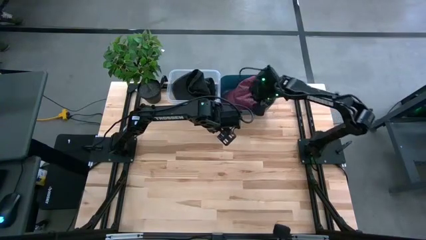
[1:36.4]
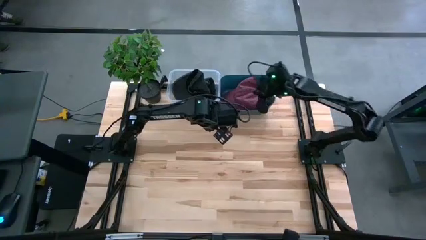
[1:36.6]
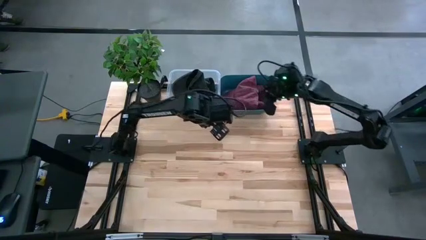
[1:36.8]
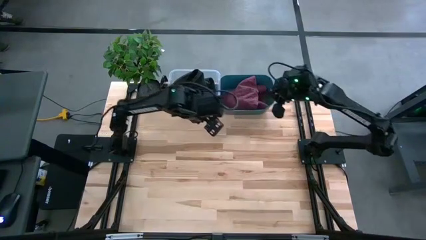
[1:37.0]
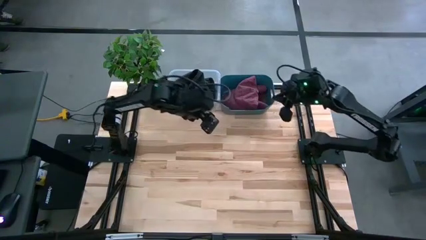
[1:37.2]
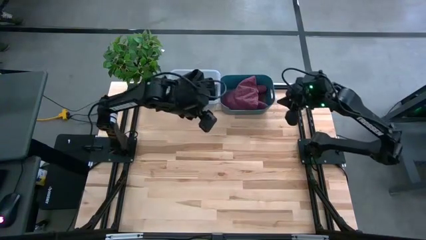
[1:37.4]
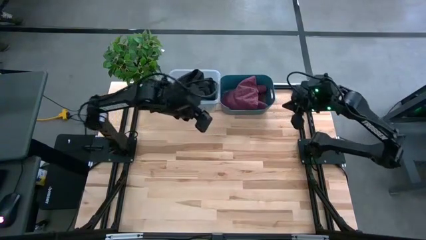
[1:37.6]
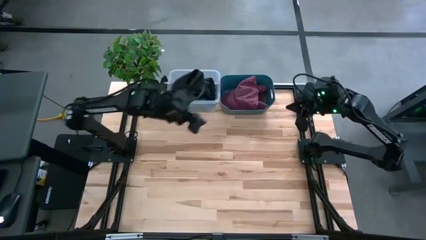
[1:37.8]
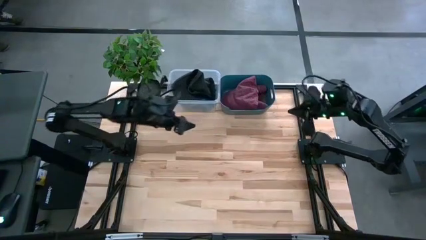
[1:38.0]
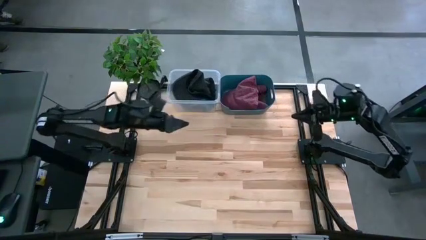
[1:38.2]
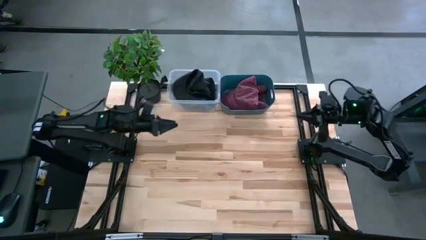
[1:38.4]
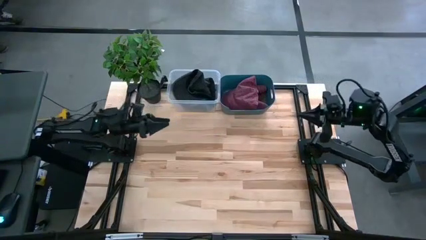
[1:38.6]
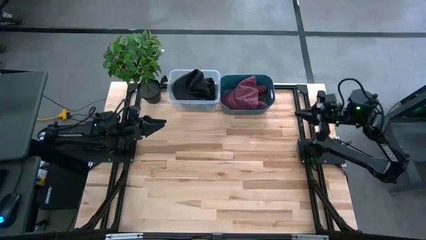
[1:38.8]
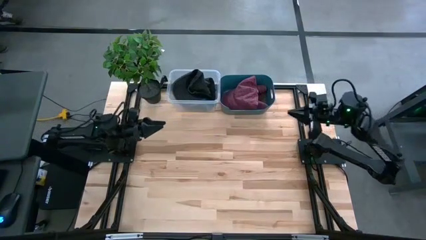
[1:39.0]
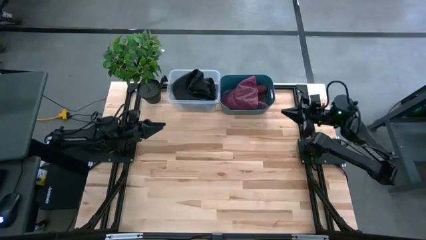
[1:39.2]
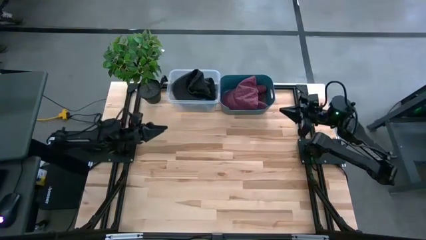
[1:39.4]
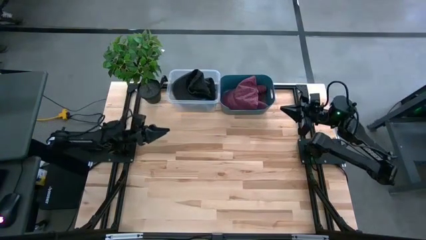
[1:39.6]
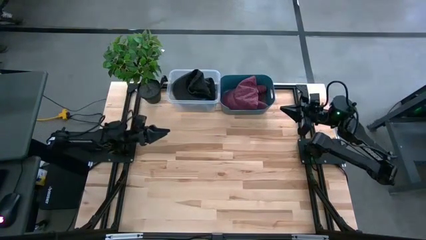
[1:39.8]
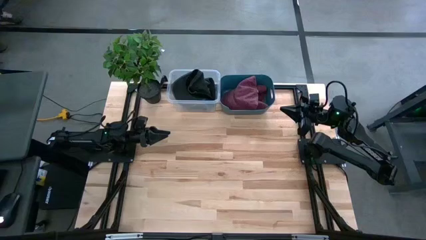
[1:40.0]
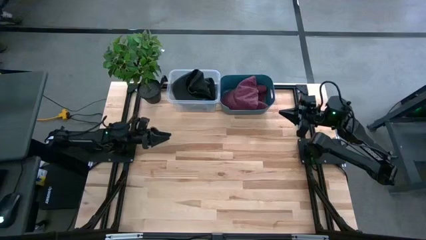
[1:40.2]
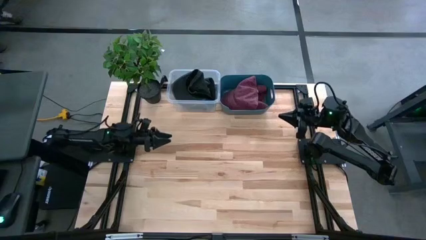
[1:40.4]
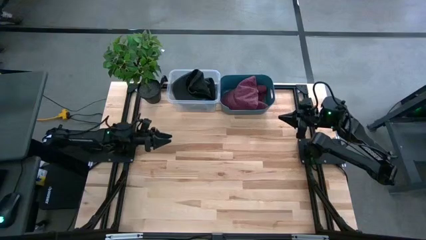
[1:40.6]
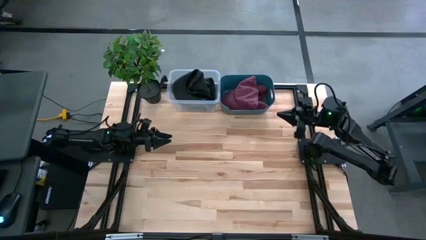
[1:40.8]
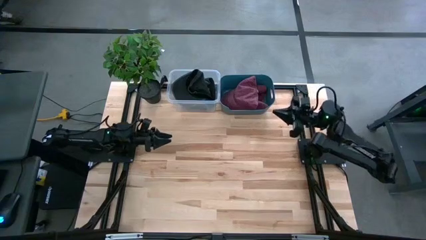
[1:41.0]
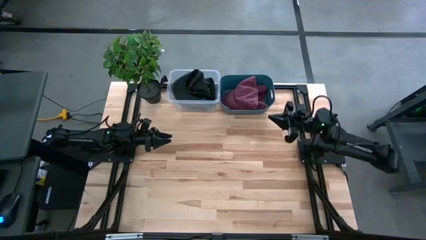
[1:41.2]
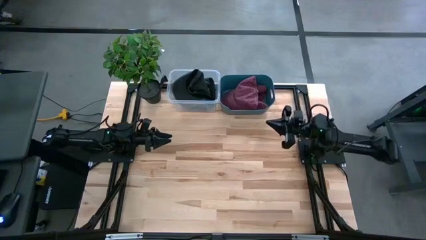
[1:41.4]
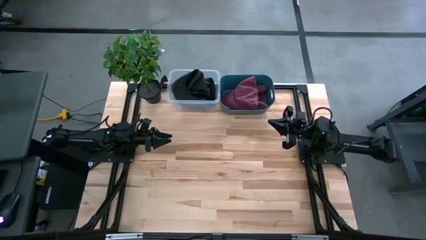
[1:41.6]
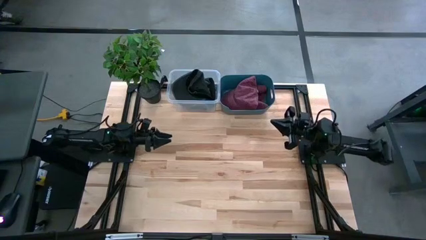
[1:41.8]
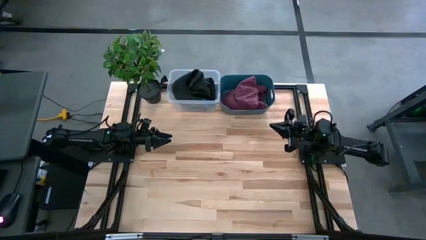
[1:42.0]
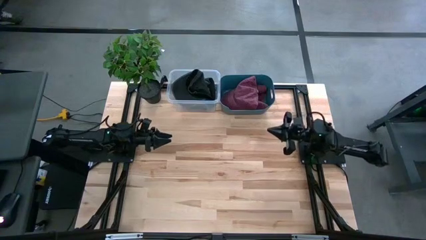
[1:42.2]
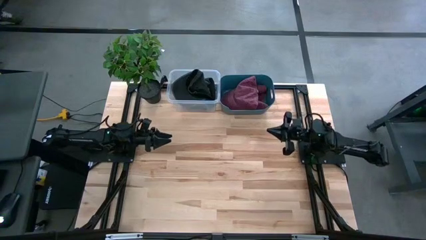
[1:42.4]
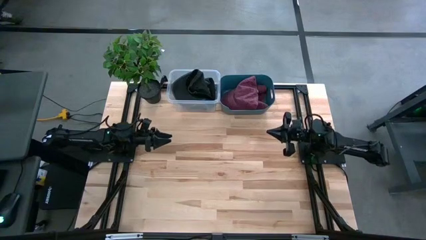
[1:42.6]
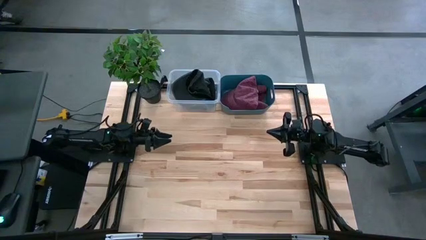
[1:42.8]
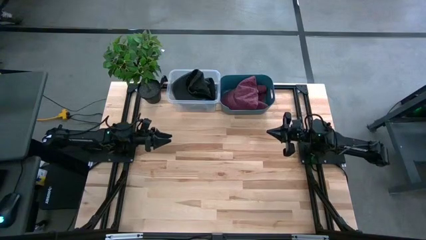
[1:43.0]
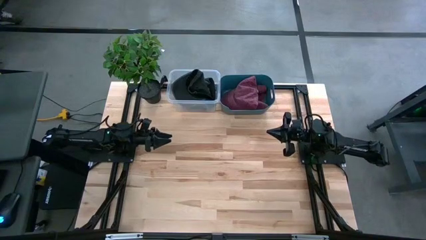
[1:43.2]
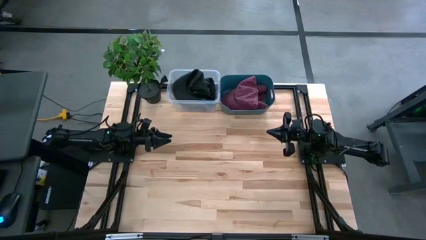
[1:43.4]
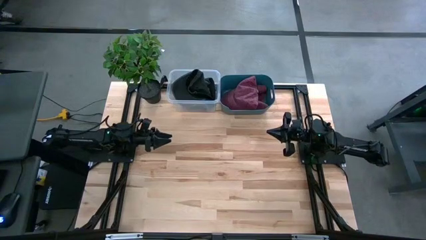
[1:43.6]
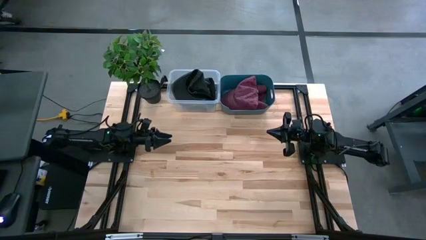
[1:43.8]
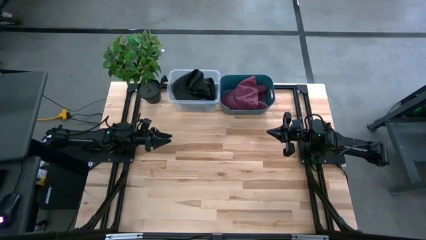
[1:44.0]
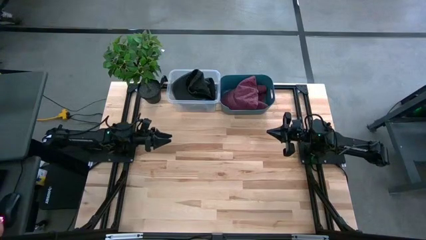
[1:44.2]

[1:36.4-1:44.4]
Task: Pick & Place hat
Return to Home Position

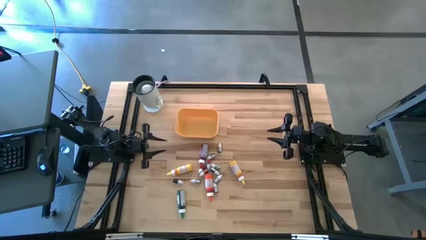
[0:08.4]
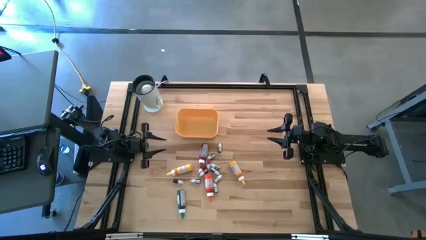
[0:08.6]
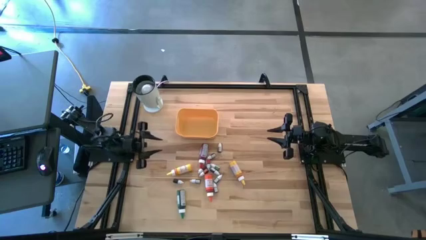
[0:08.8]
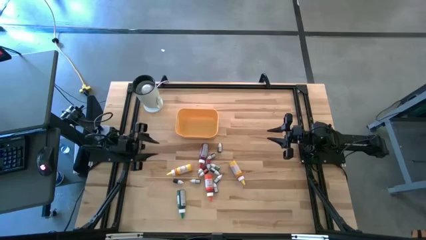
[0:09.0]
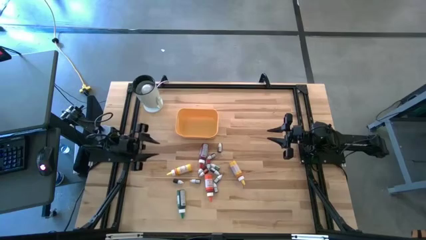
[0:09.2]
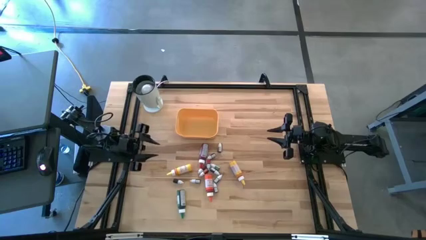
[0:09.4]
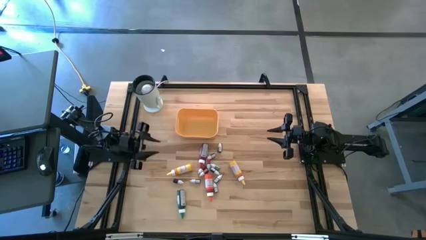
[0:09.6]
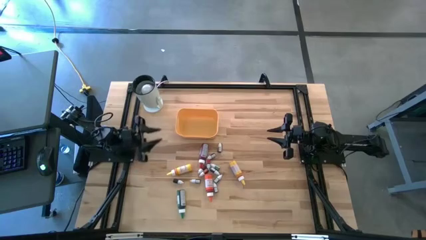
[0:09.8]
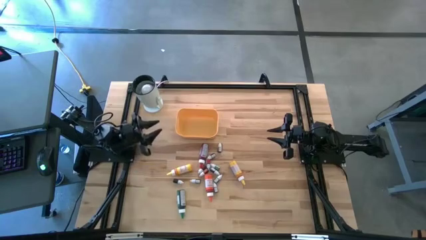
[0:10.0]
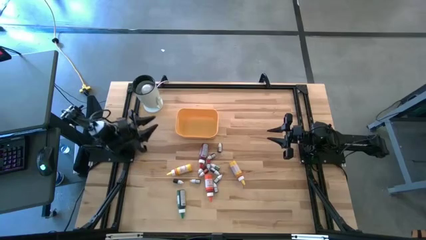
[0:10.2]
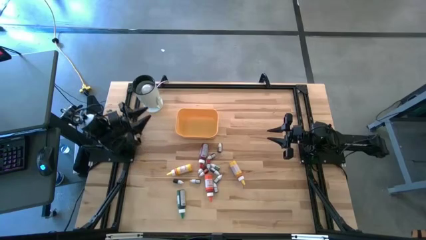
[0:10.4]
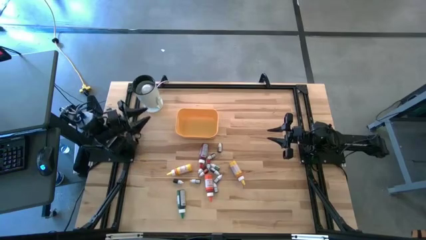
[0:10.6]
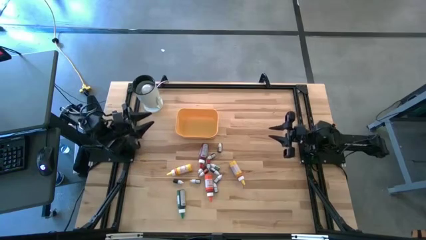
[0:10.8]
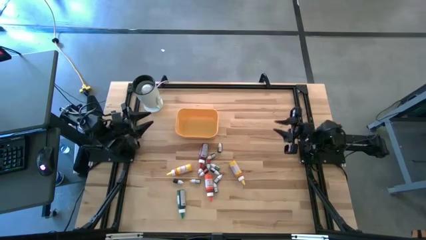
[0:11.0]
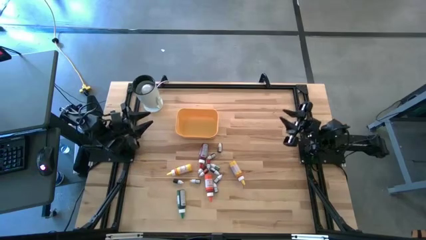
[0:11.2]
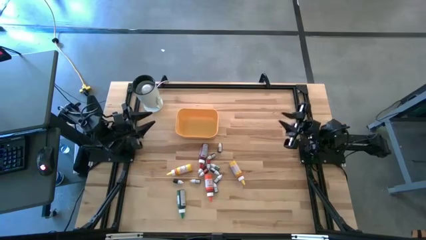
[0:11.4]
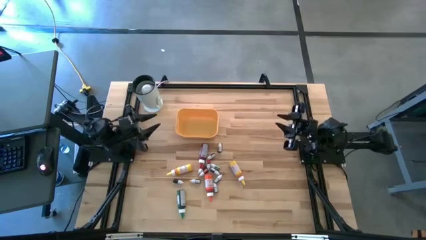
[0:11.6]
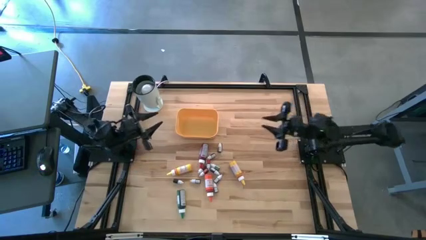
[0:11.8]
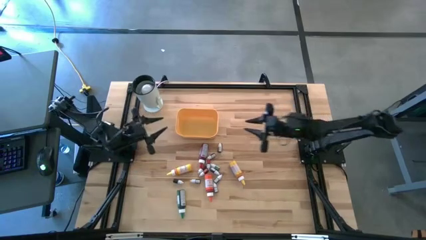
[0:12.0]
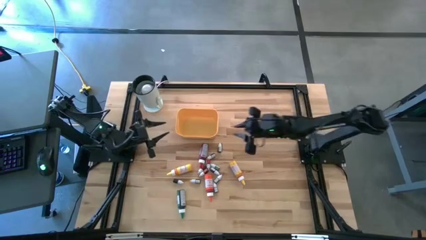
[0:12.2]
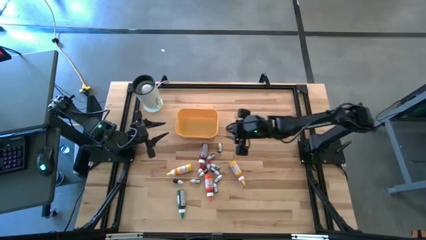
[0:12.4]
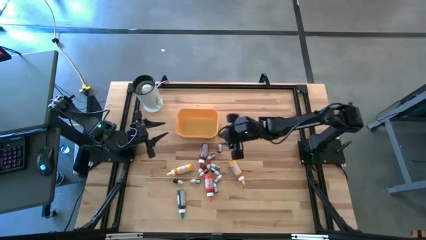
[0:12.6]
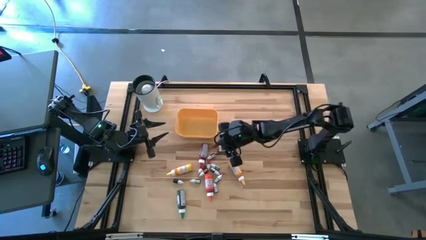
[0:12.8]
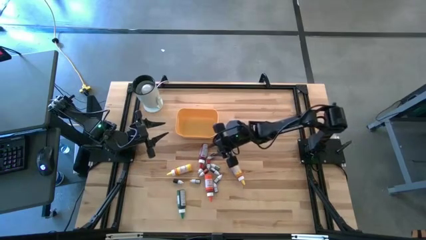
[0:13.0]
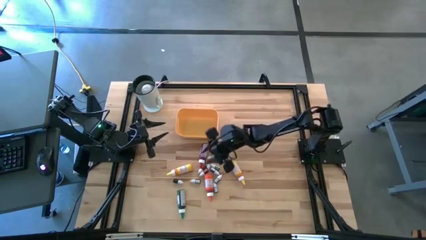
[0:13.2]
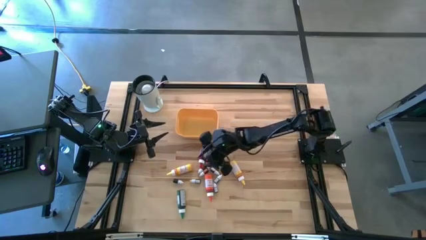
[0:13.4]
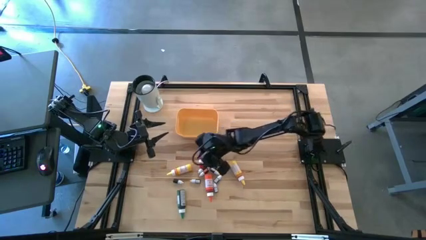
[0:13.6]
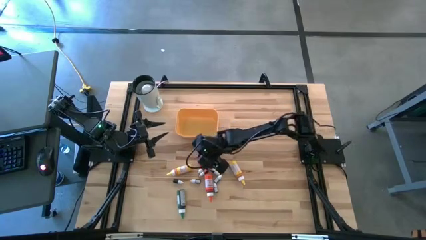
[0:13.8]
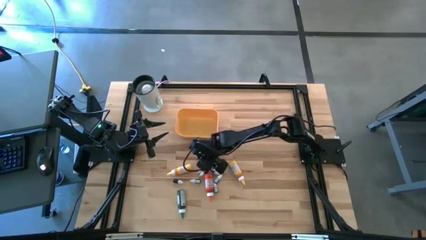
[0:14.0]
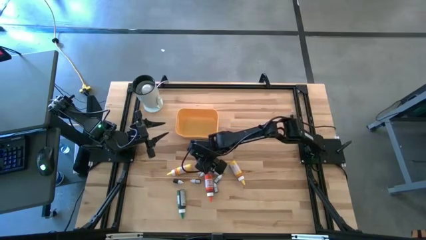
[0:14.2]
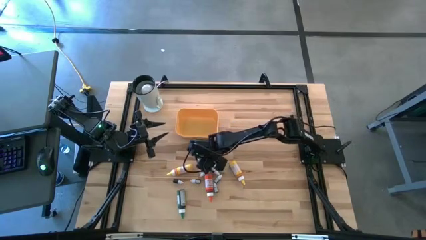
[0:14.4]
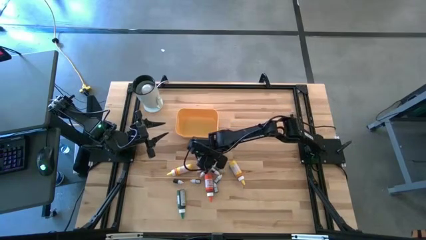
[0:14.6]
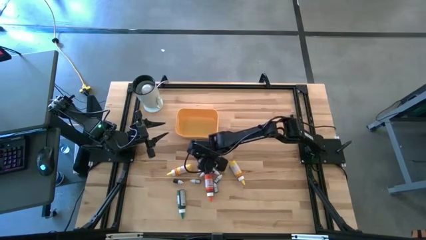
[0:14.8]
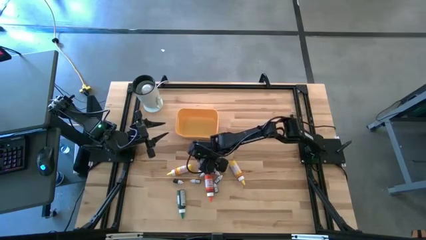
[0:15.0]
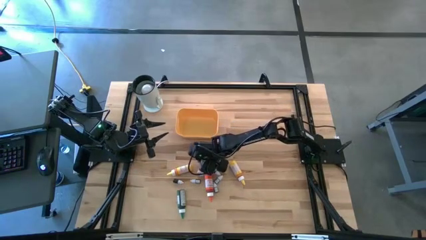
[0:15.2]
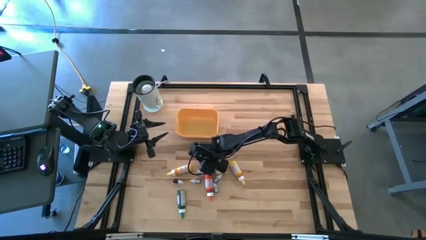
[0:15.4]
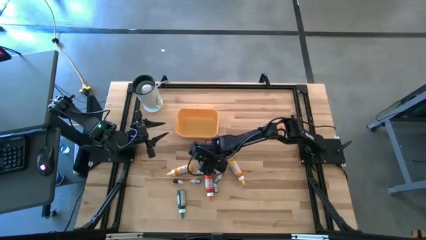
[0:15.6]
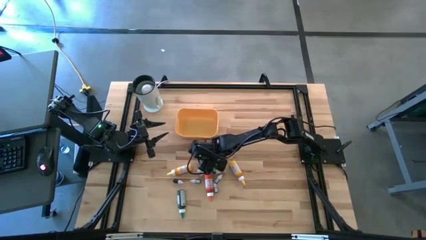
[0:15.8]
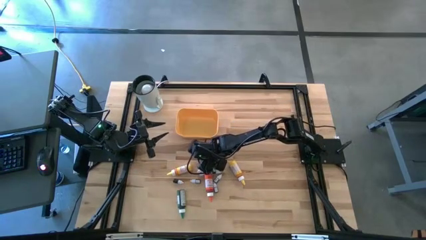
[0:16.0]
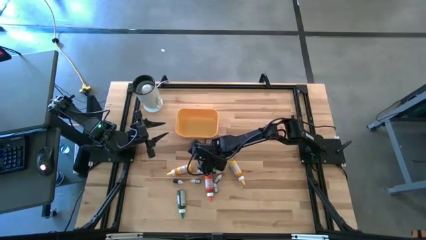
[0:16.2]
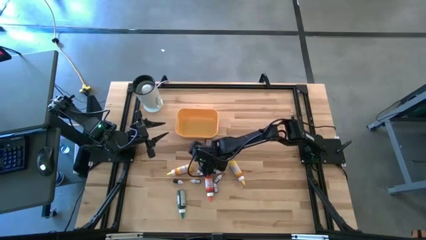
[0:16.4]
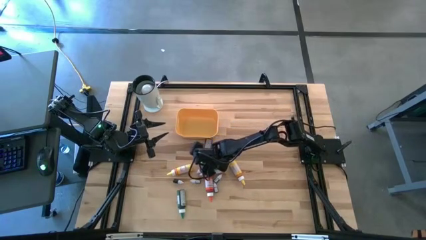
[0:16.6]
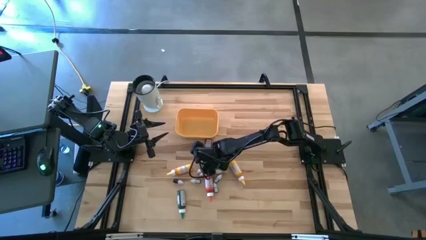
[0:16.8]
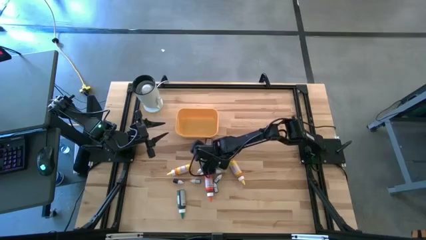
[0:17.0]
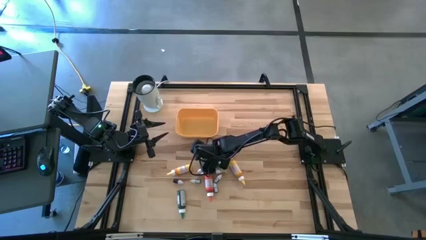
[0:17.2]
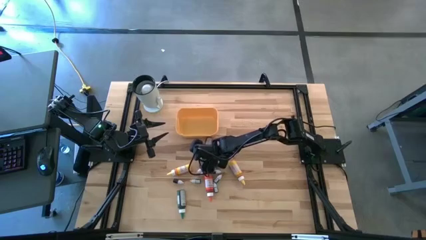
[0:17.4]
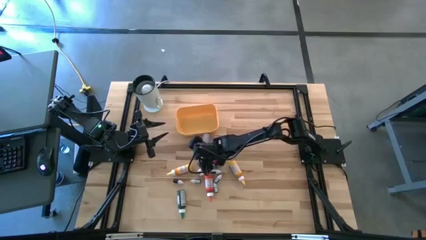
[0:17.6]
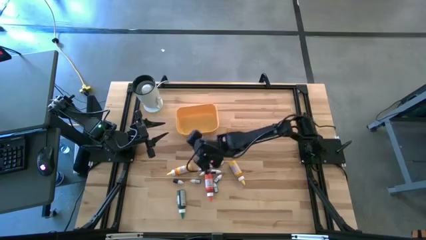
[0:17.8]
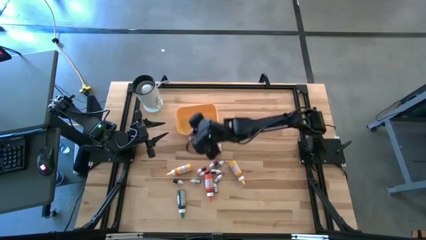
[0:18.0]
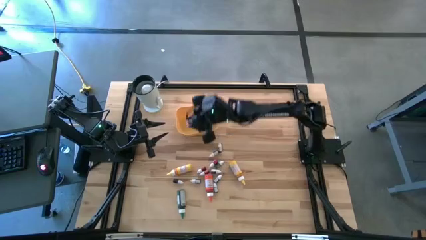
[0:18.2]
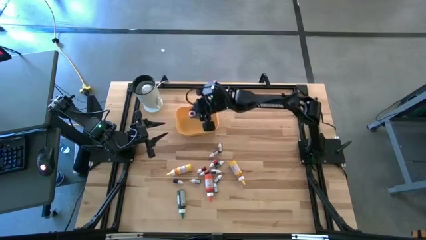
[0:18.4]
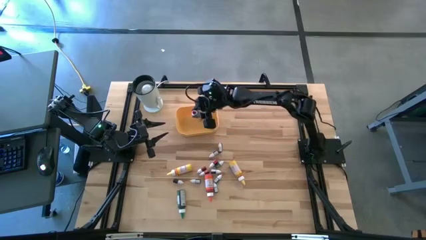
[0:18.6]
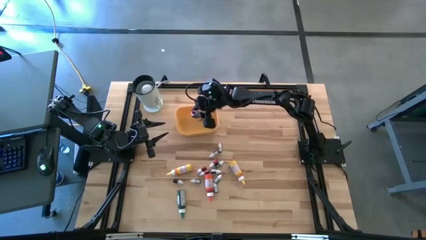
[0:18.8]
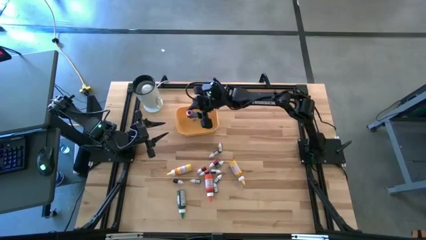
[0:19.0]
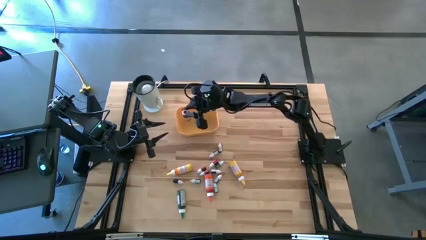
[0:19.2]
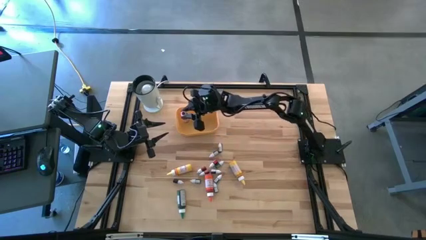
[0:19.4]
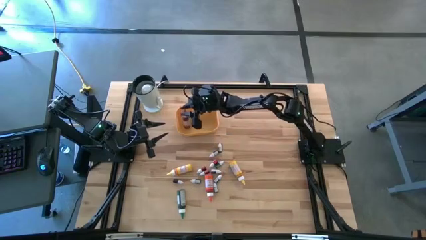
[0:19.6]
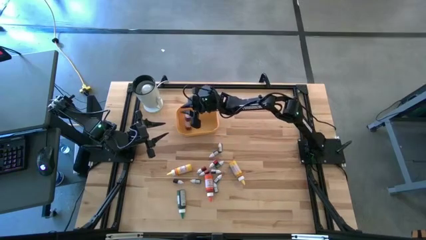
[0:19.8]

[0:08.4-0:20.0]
Task: Pick & Place food coloring
Put the large red food coloring bottle into the yellow bin
